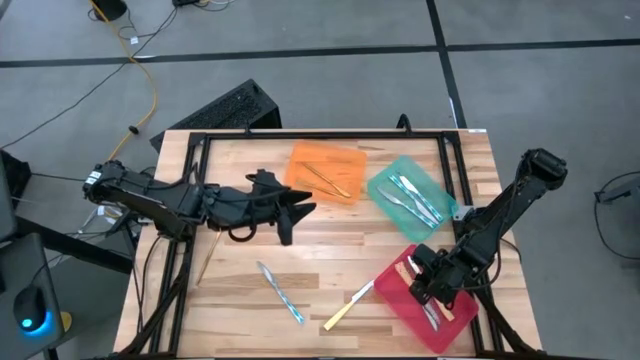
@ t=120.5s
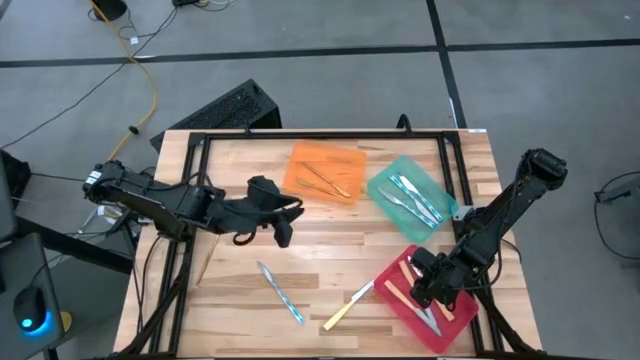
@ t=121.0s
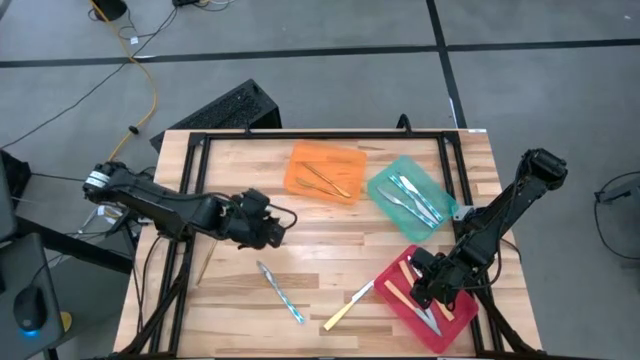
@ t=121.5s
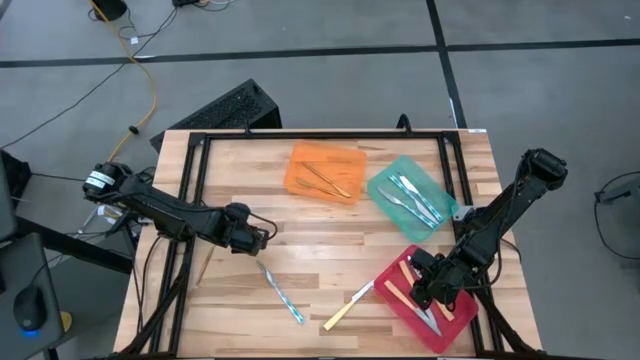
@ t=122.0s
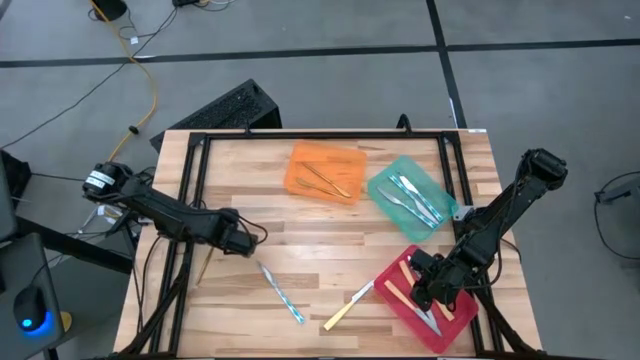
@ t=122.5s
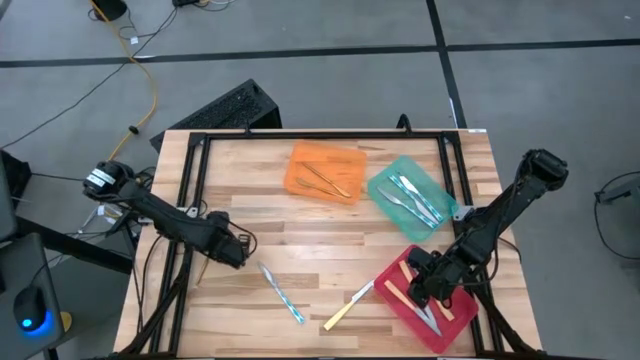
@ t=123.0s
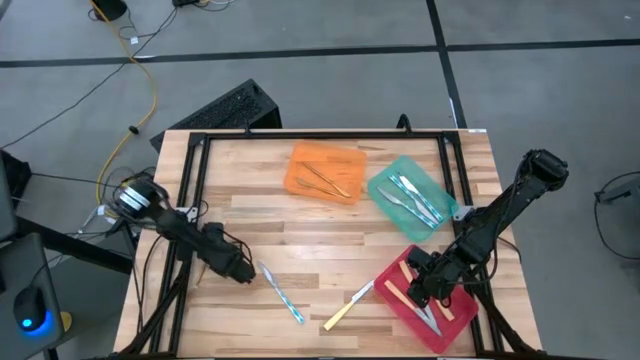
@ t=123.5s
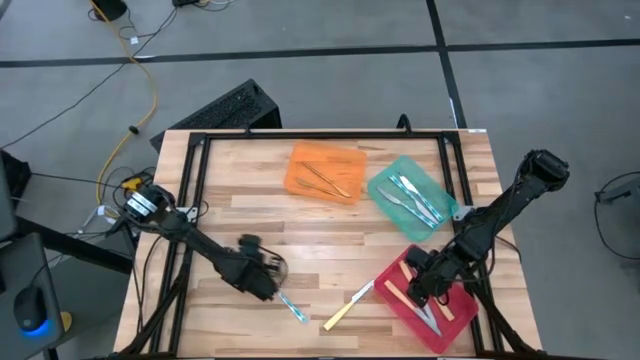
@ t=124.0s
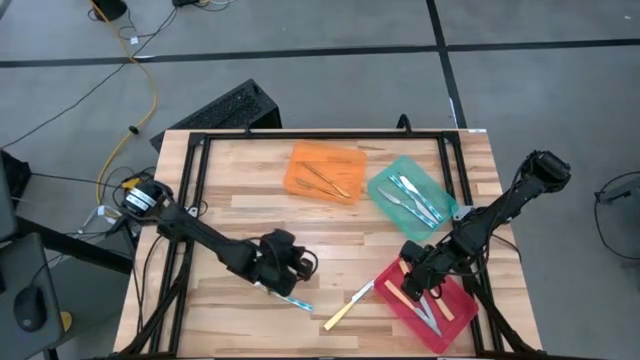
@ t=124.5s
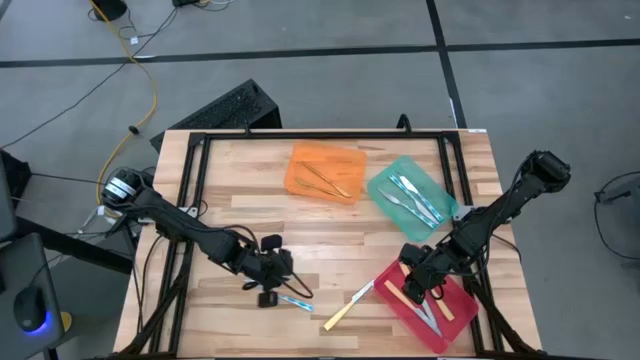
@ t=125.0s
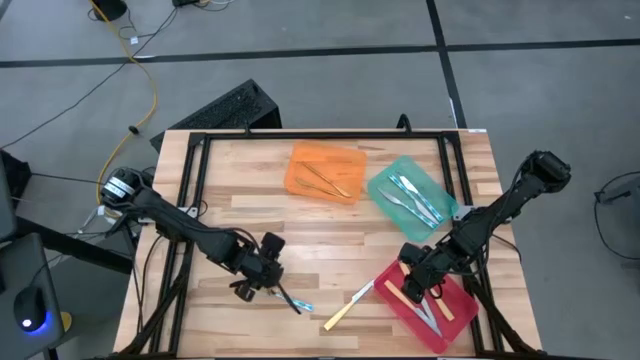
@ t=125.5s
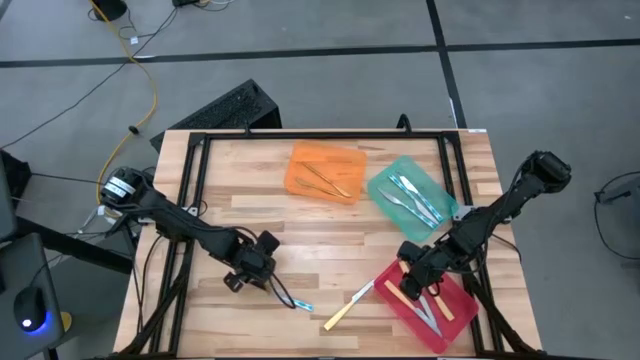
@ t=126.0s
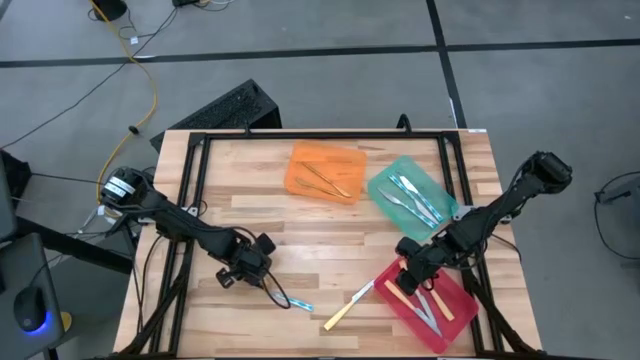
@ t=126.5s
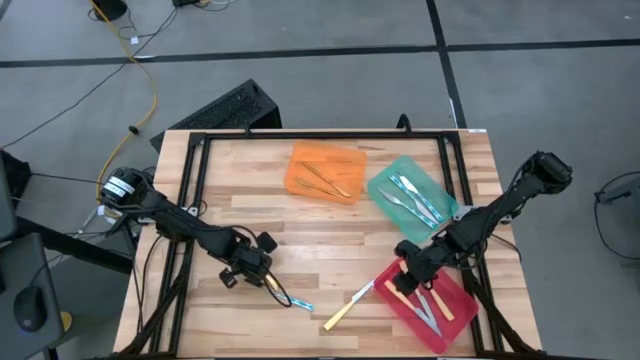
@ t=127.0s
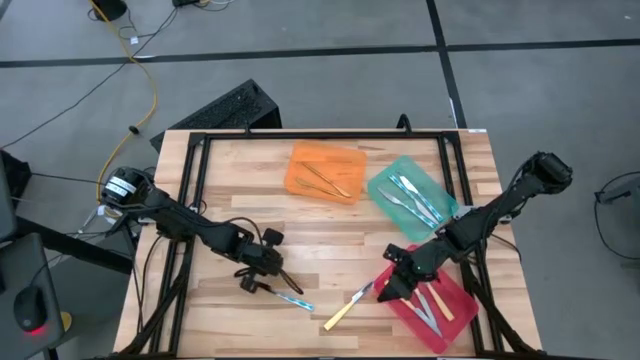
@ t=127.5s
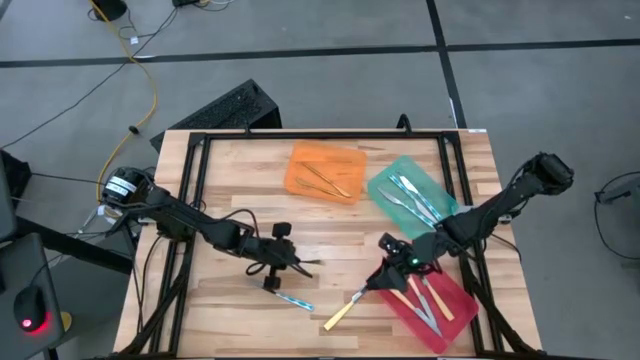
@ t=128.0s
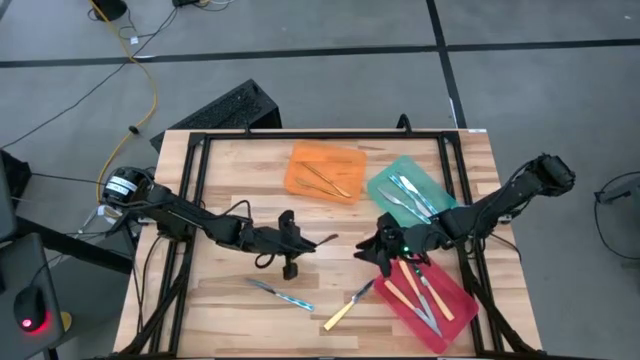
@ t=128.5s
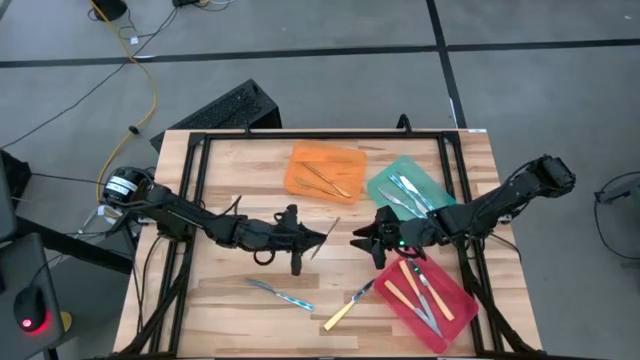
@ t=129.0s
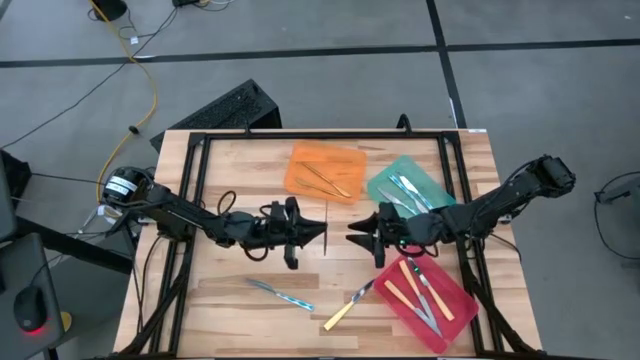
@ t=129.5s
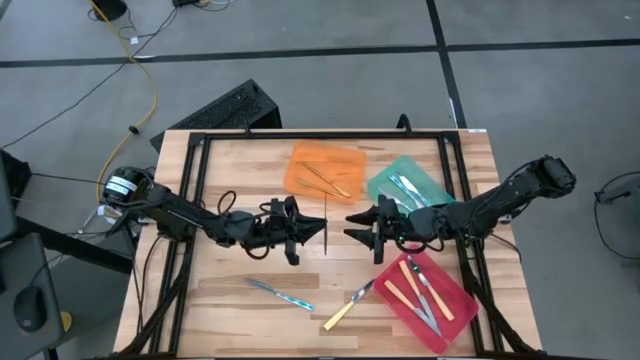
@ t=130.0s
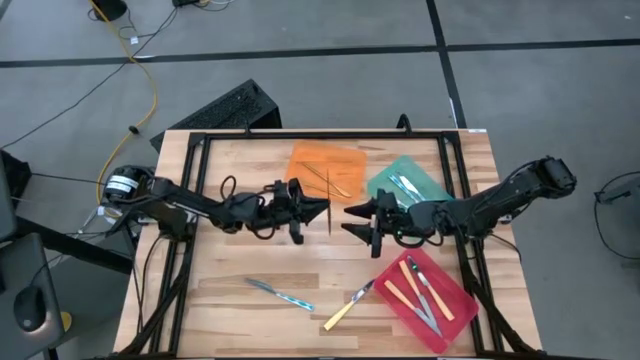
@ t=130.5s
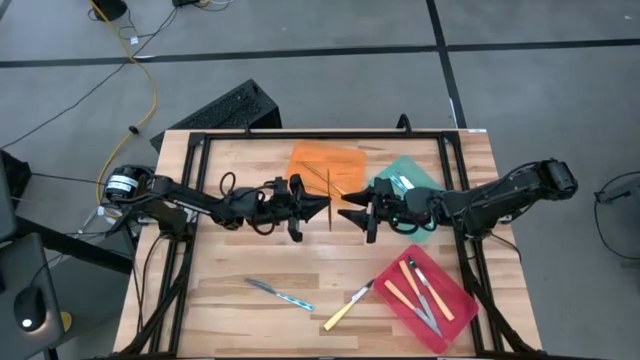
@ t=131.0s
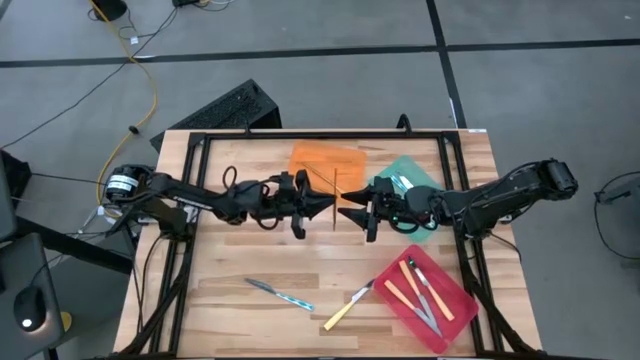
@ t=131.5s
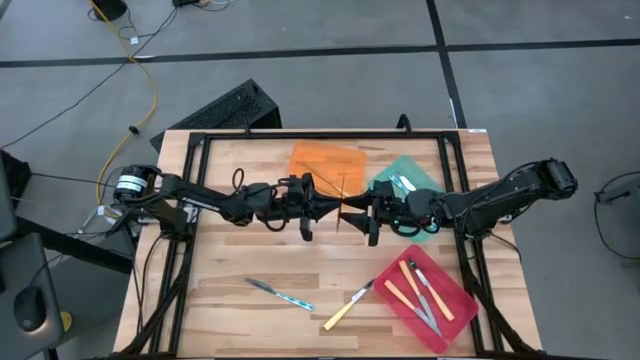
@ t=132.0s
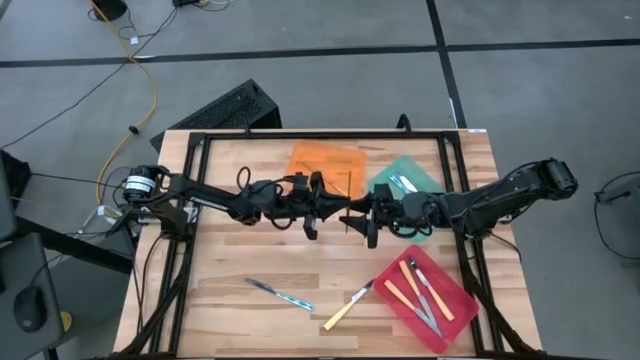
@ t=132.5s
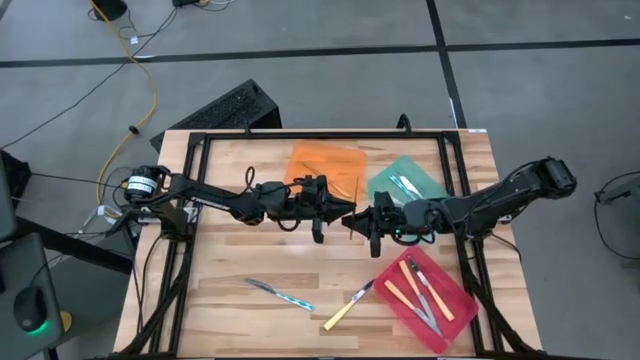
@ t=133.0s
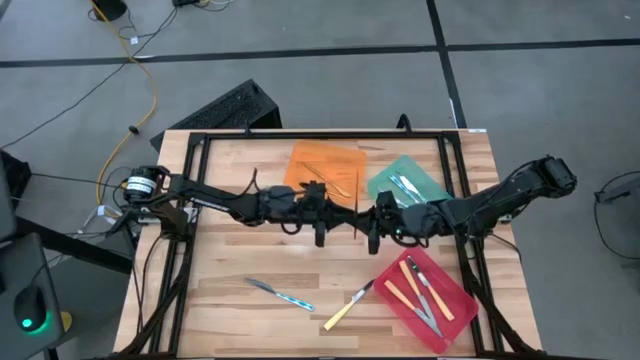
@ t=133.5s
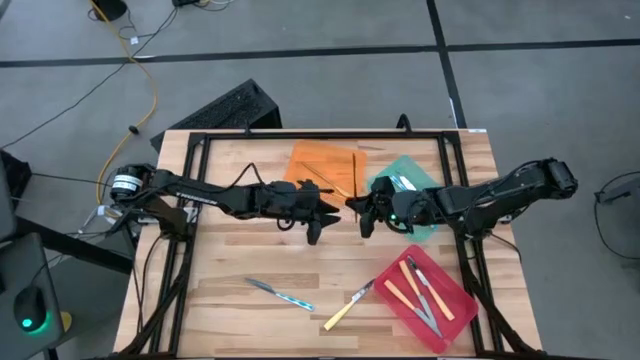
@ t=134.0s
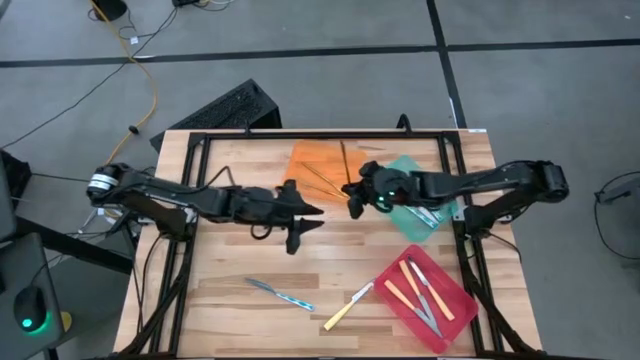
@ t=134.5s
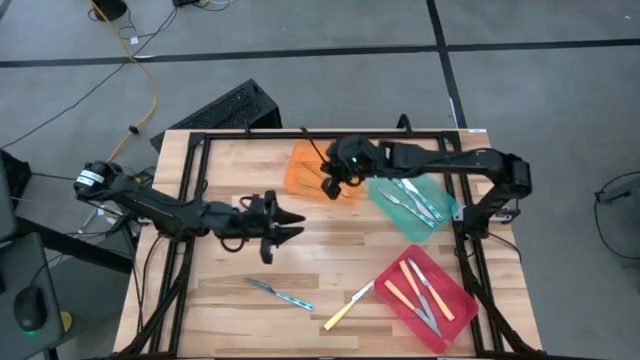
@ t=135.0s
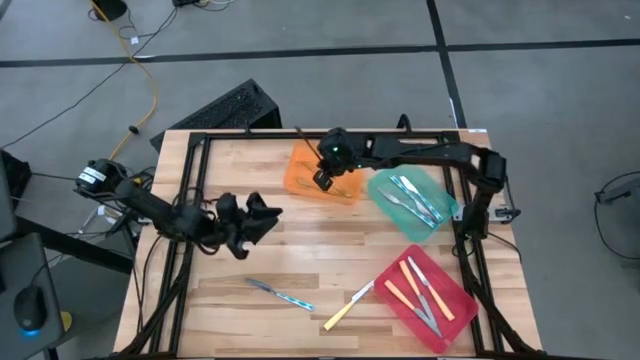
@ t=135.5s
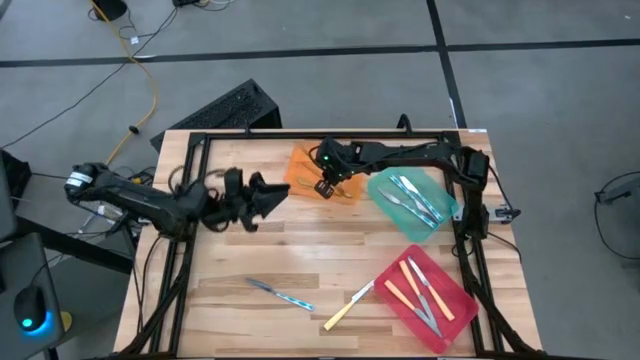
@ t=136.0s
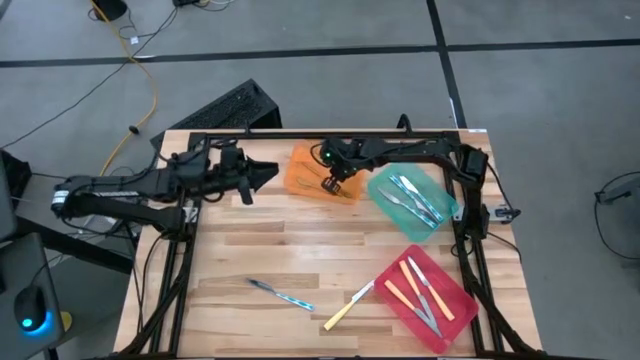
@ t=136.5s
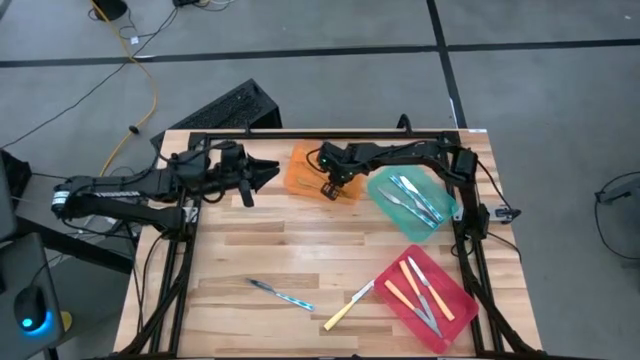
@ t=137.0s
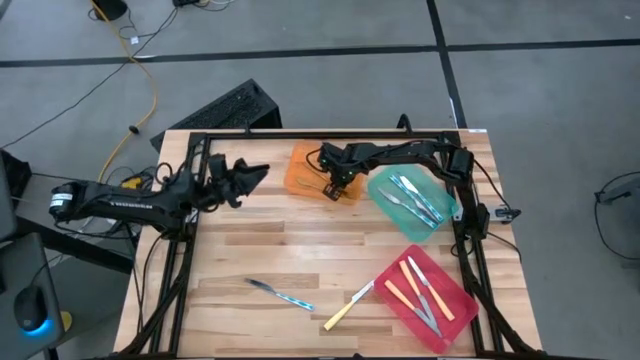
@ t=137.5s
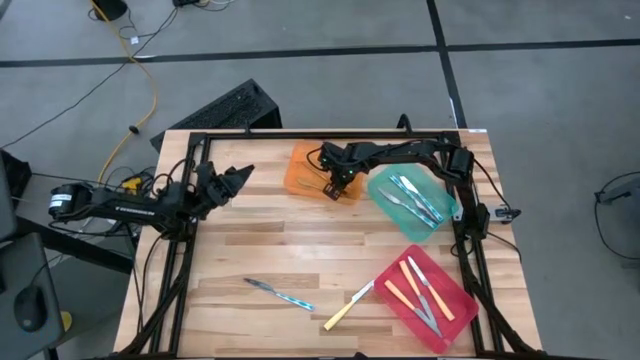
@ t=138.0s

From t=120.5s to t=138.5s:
Task: Sort silverware by color (type)
Put the gold knife into the orange bin

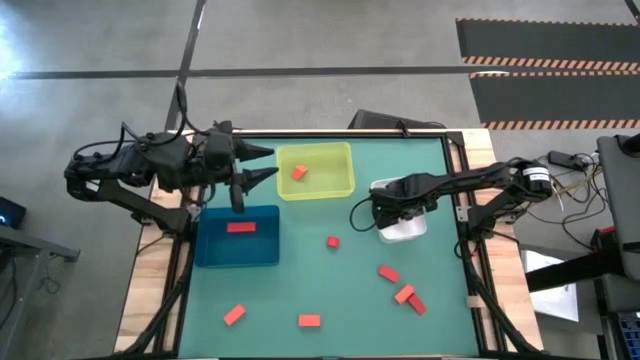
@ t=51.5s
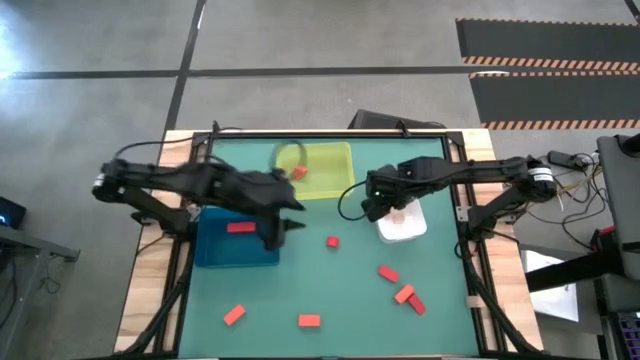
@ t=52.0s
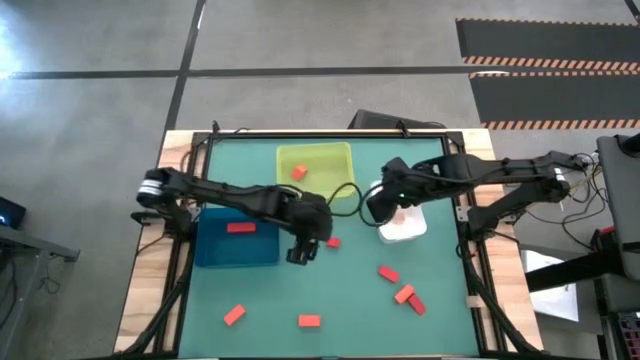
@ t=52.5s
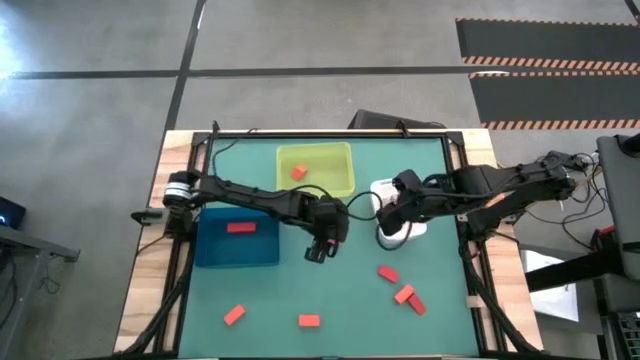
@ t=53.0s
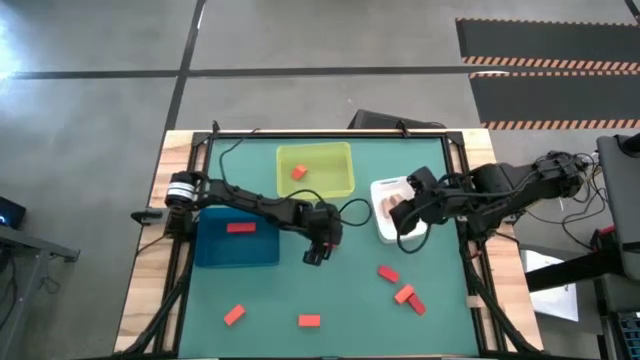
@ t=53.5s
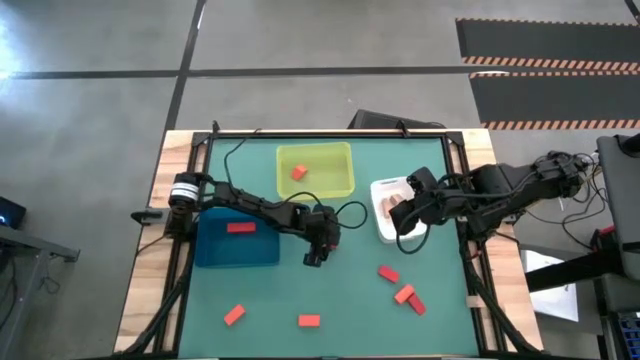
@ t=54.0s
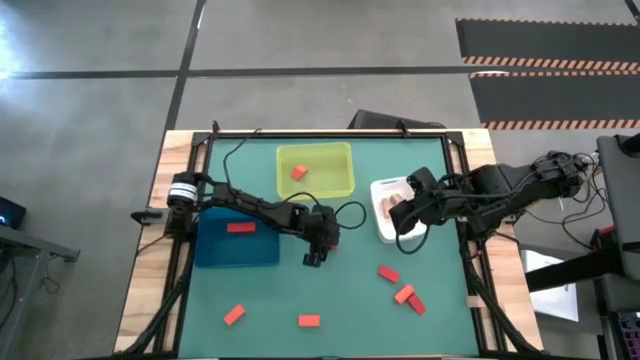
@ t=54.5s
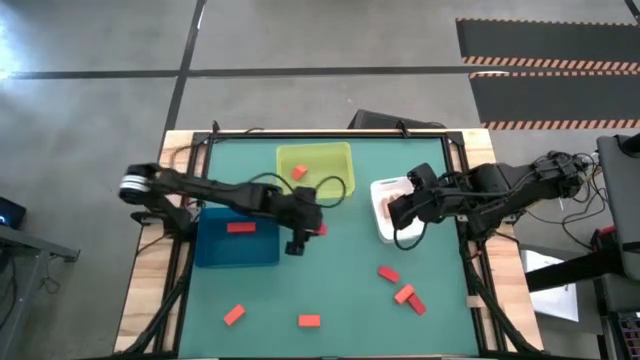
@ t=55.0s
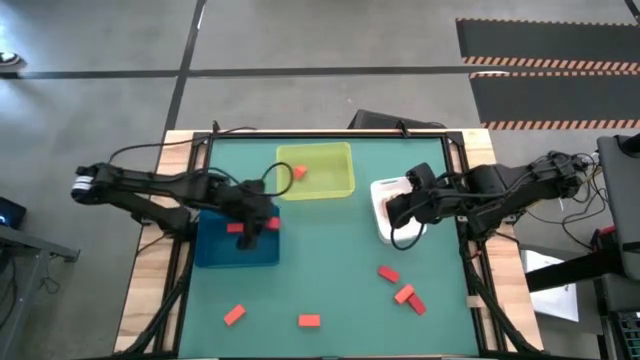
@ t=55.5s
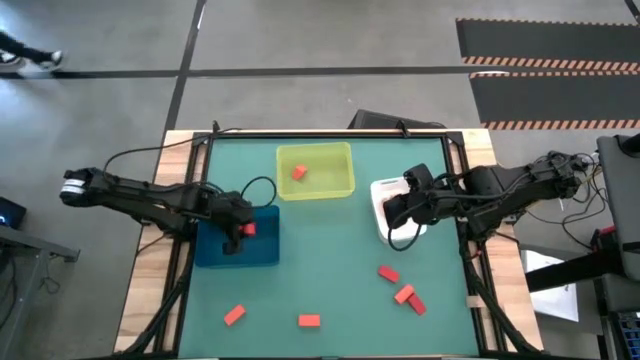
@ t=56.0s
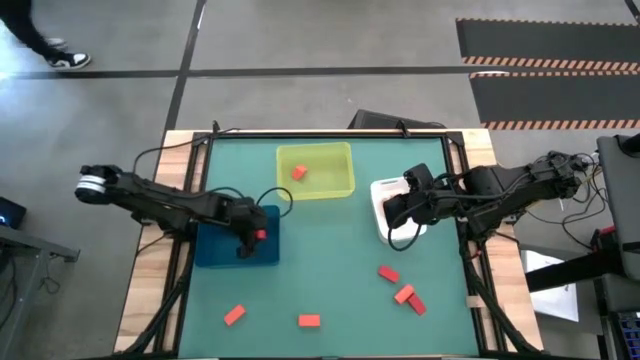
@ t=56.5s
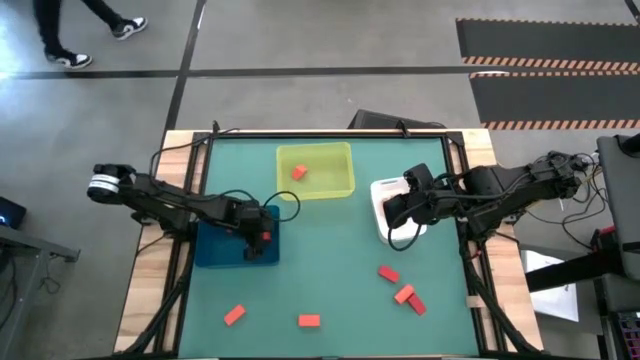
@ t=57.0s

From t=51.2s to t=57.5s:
Task: Sort & place blocks by color
Put the red block into the dark blue bin
